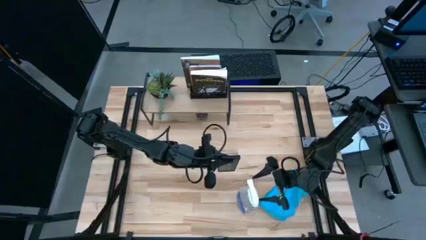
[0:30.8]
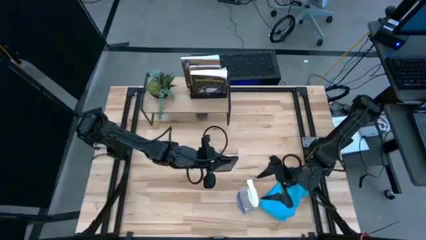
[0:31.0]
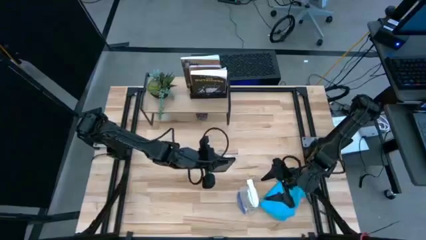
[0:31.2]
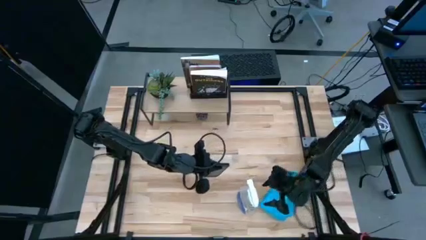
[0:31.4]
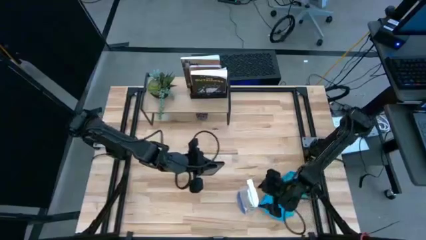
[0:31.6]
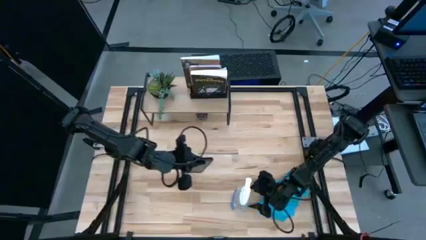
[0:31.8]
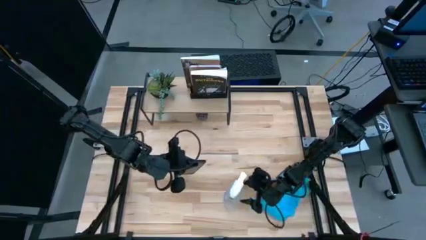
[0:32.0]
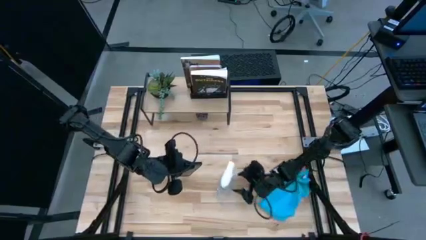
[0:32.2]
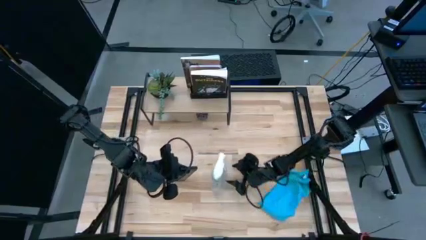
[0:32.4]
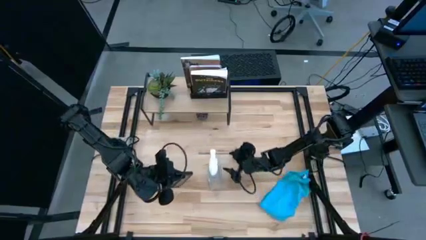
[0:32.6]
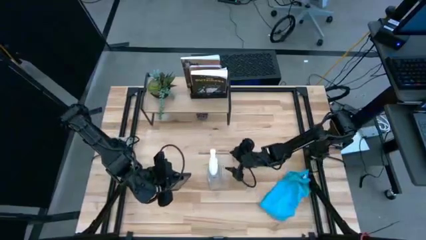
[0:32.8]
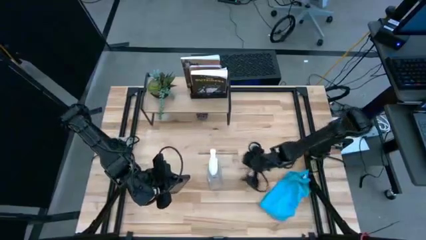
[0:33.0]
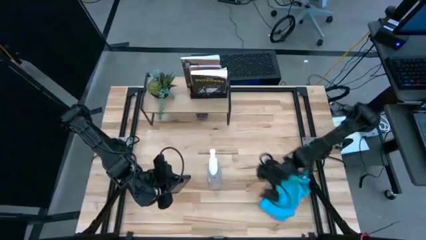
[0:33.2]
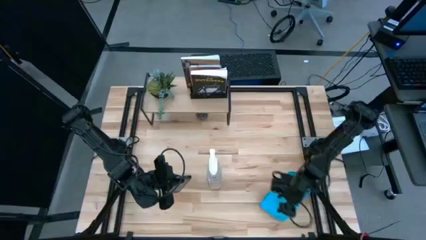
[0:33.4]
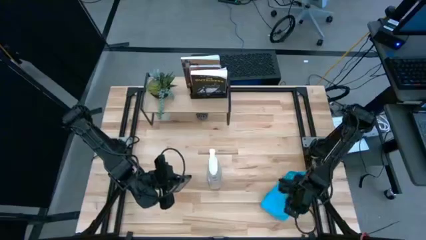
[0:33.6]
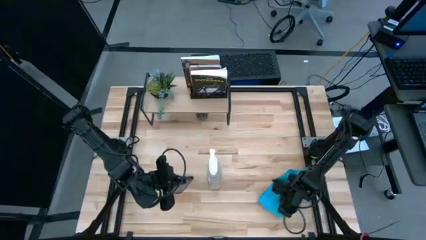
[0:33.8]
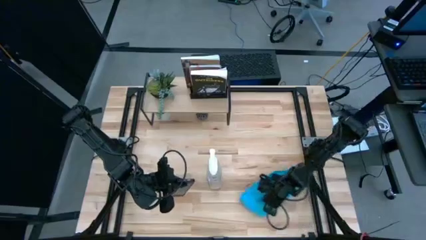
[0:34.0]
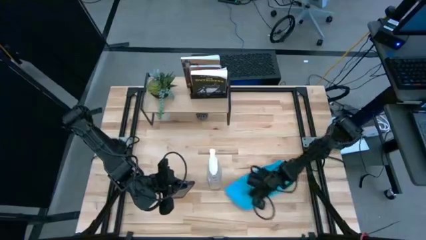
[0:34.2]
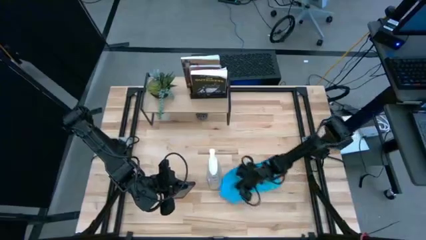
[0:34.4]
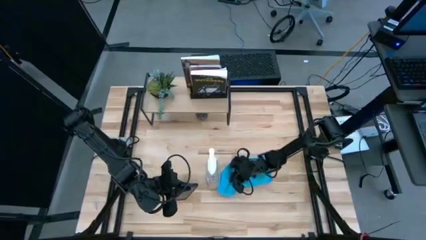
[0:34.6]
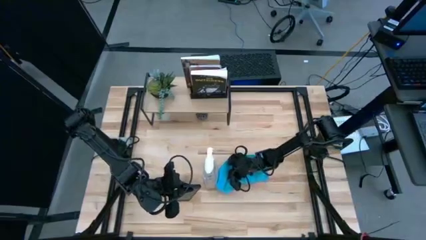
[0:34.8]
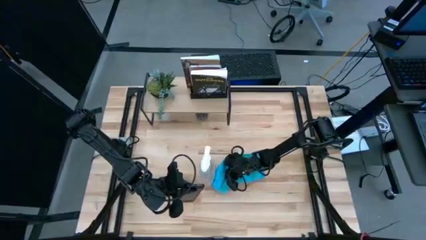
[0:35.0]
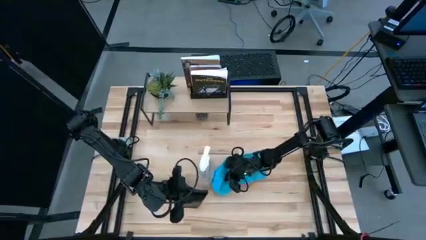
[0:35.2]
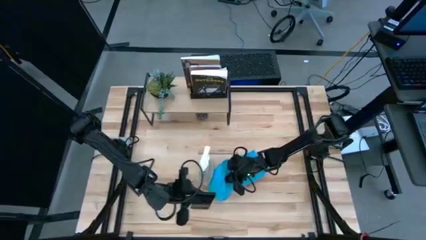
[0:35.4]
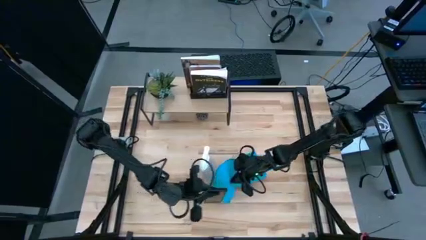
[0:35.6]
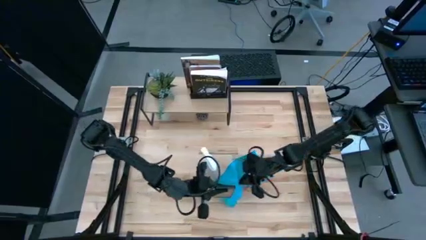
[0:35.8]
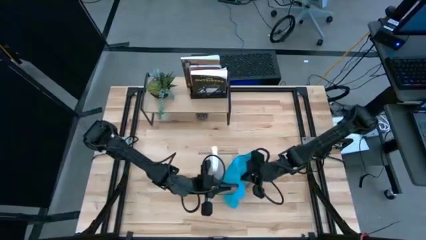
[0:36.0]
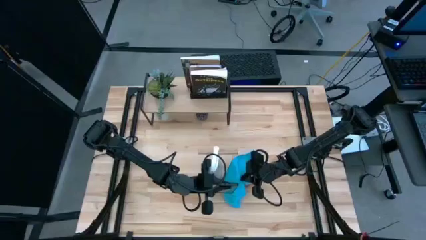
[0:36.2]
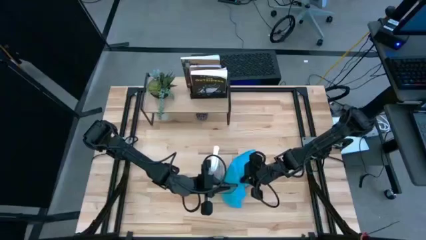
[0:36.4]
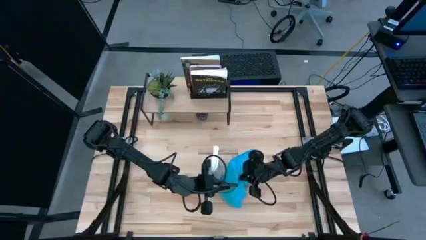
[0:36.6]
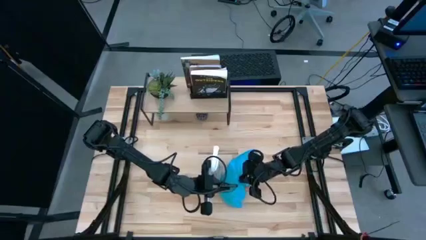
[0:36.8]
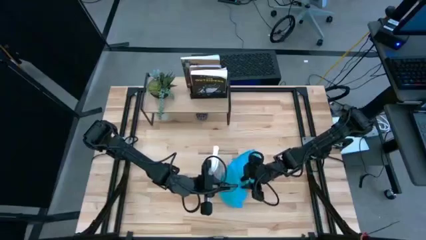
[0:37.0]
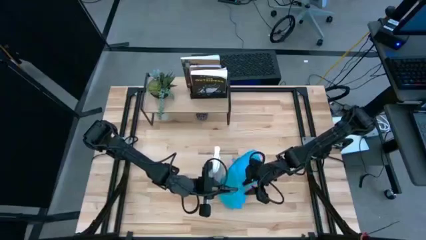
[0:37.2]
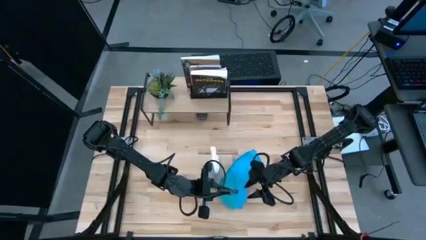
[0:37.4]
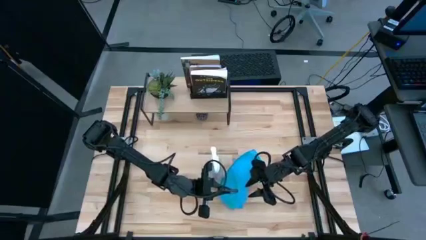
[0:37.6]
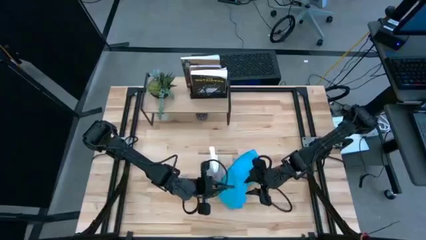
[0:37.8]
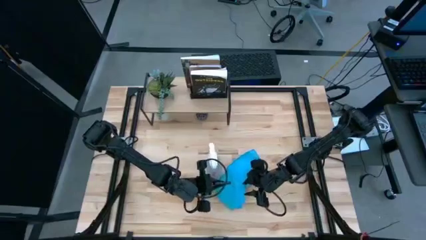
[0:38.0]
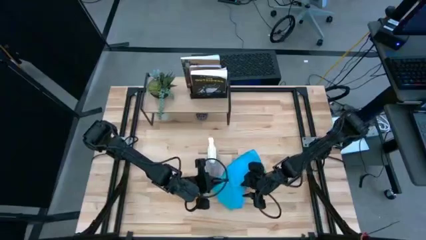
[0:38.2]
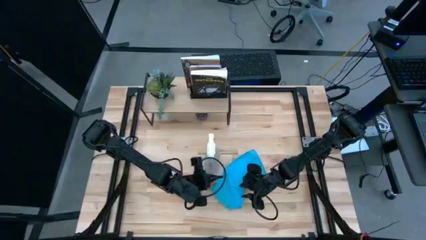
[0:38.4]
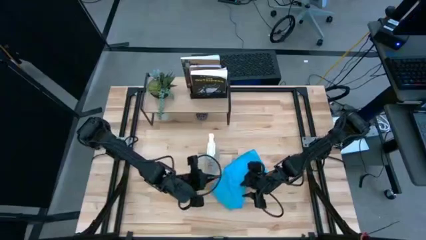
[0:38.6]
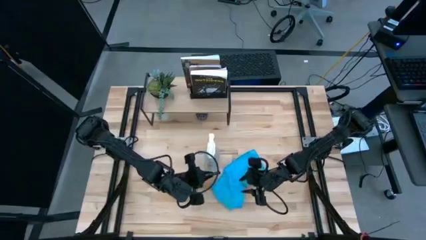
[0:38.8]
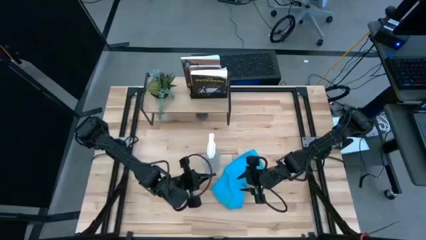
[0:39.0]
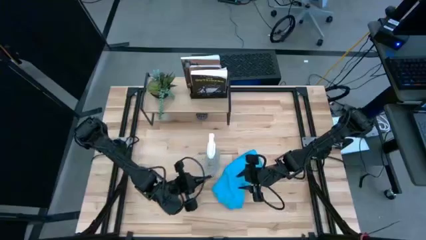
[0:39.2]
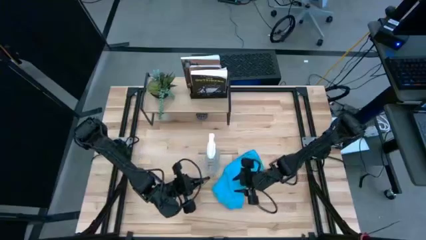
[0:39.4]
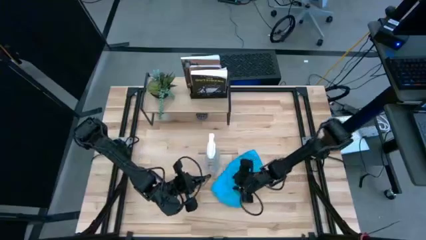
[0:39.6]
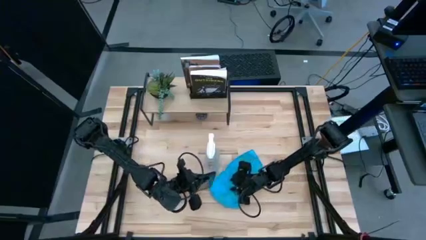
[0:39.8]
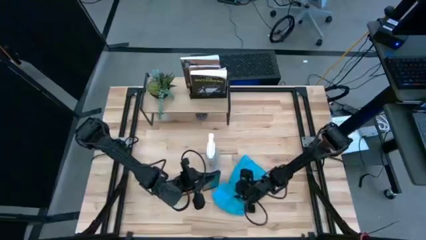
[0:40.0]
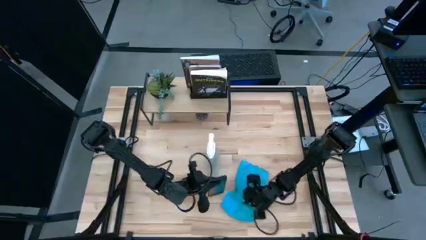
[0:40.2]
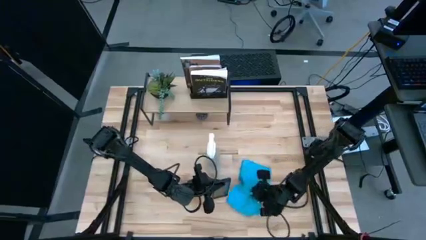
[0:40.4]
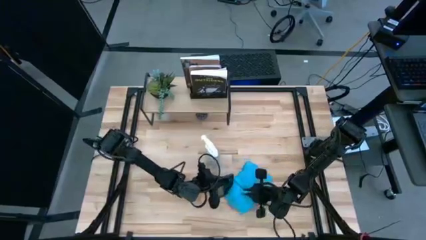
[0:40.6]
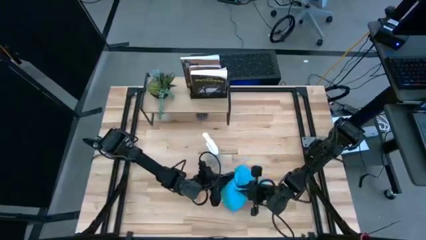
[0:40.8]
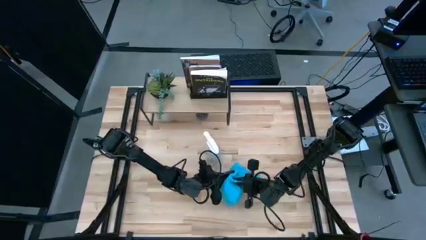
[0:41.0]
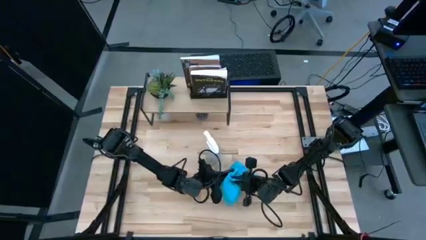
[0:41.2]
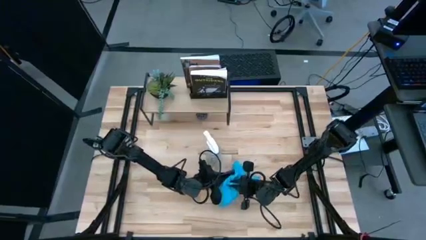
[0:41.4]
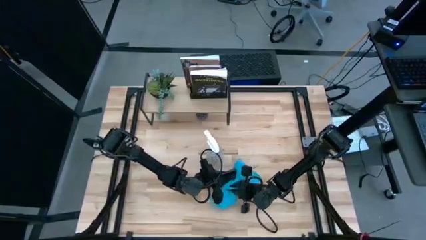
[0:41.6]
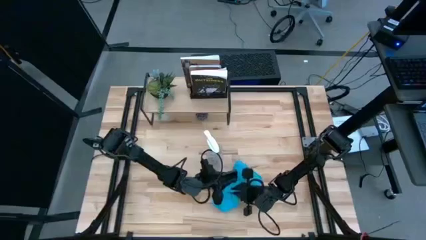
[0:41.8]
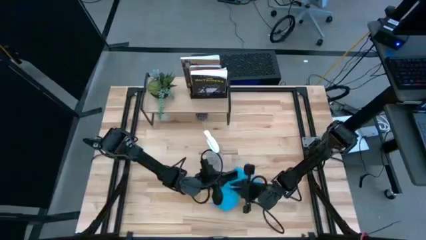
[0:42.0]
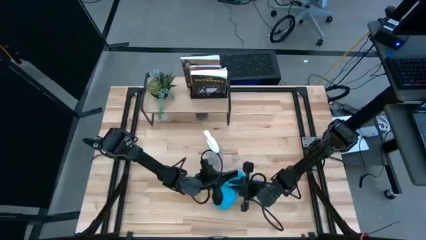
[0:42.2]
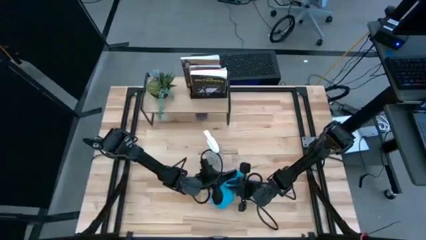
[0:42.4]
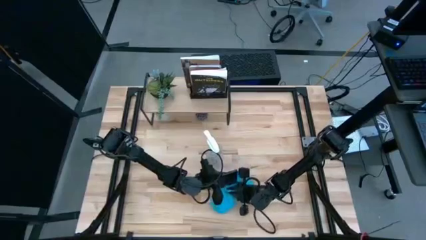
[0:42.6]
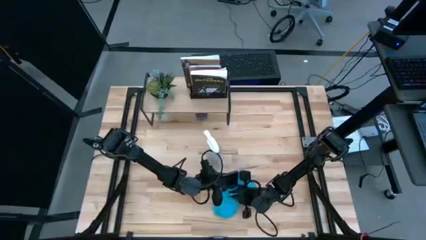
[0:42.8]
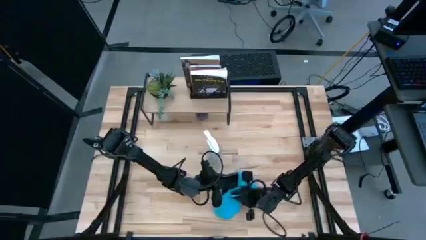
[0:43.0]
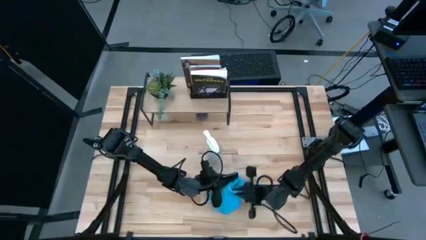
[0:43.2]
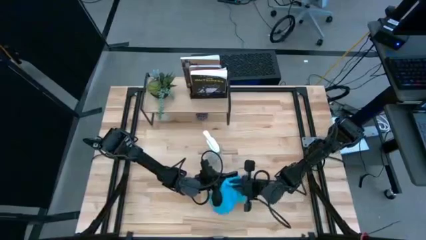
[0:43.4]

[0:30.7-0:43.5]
Task: Apply microfiber cloth
Wipe the front of the black cellphone with a blue microfiber cloth

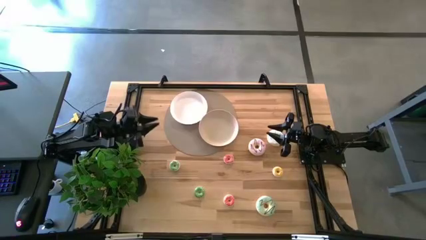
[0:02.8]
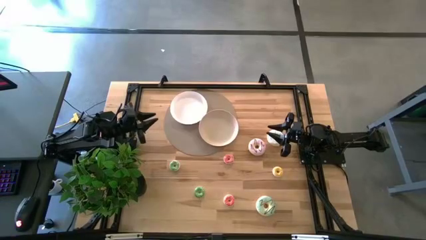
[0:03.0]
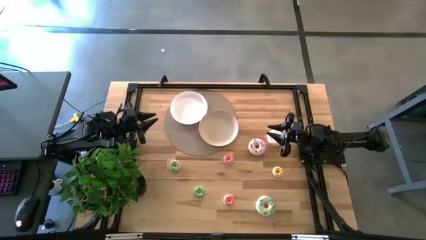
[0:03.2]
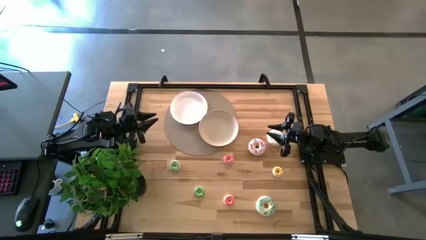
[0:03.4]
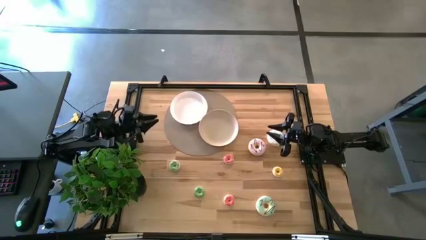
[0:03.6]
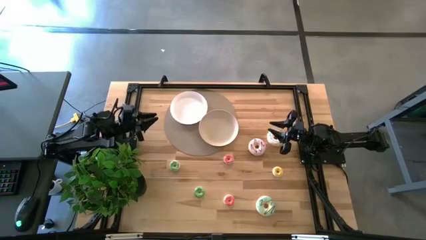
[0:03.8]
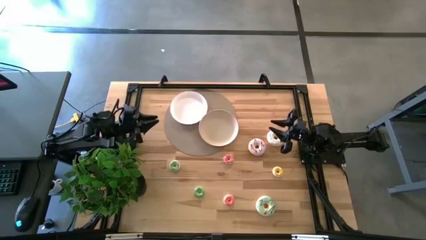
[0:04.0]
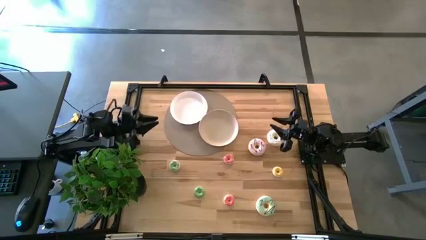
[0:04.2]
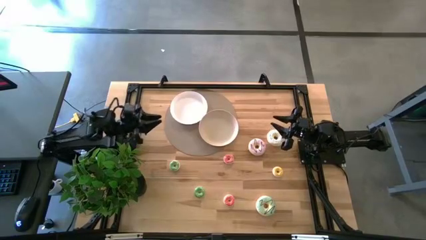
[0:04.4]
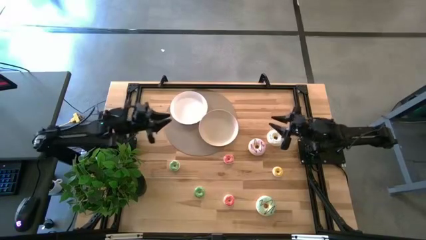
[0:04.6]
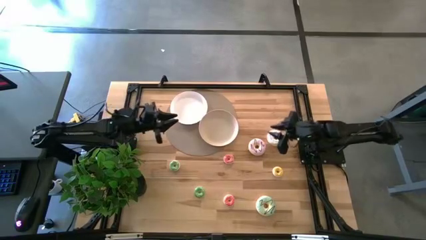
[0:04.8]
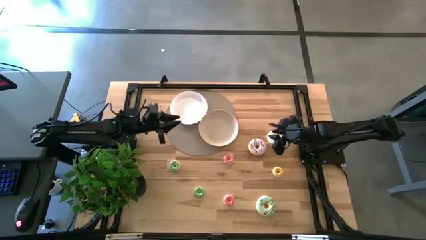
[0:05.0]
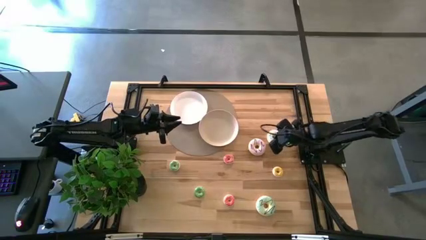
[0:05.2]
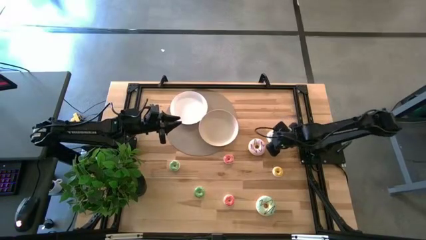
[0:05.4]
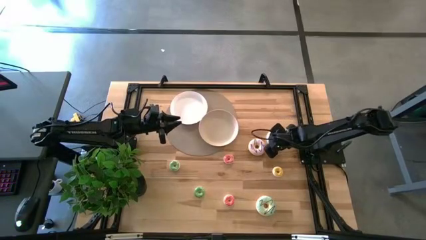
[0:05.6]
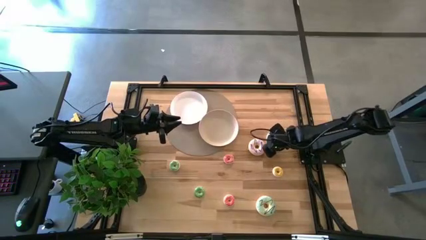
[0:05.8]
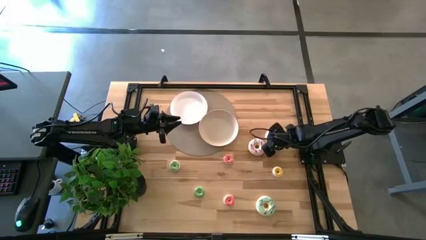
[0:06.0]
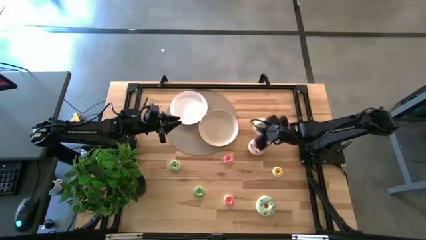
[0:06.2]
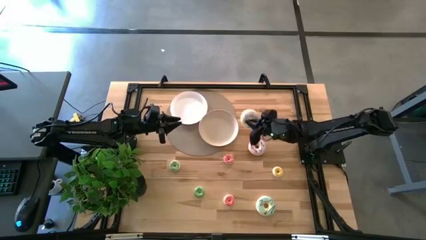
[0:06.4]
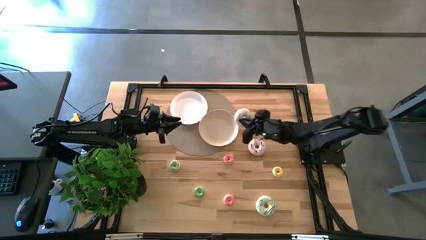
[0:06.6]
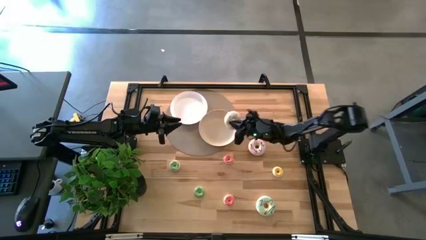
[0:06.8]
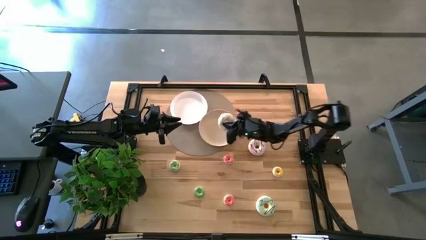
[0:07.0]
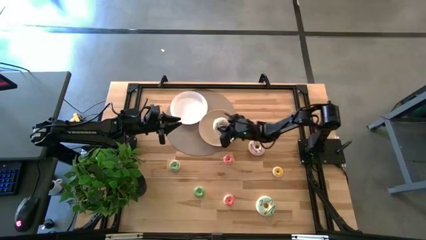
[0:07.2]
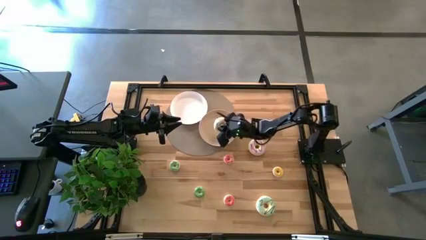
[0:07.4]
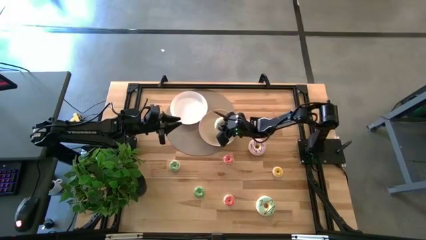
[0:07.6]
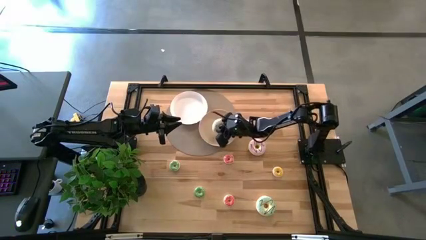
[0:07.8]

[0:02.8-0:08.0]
Task: Pick & Place donuts
Put the large white doughnut on the brown plate
